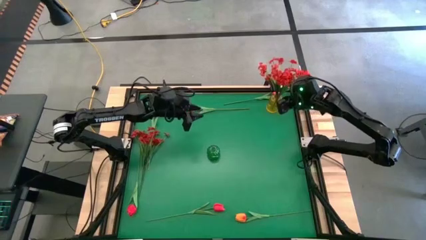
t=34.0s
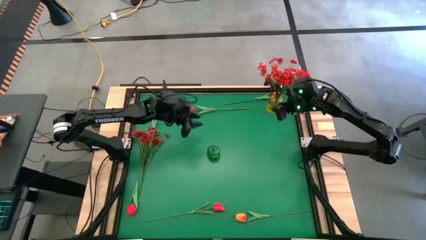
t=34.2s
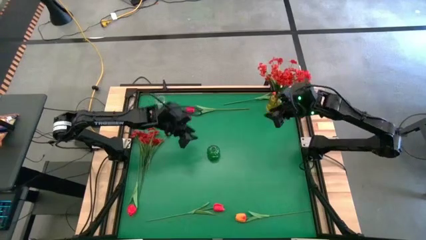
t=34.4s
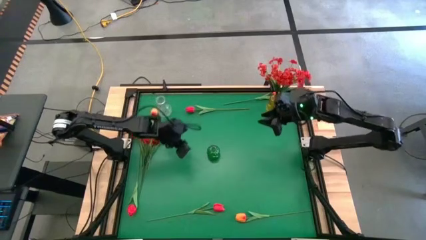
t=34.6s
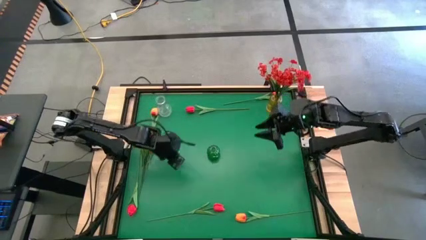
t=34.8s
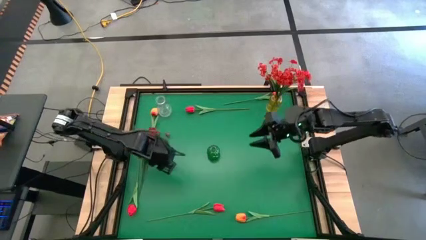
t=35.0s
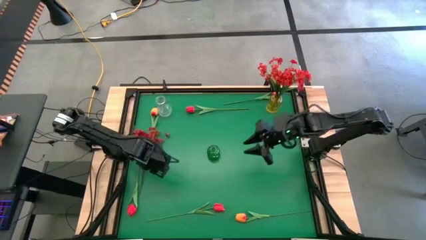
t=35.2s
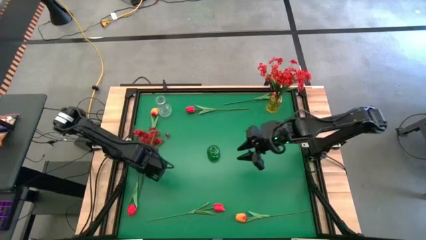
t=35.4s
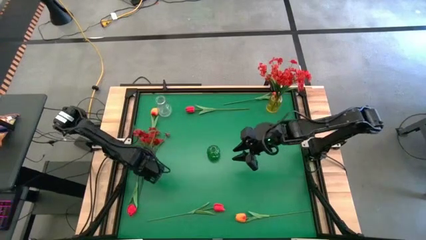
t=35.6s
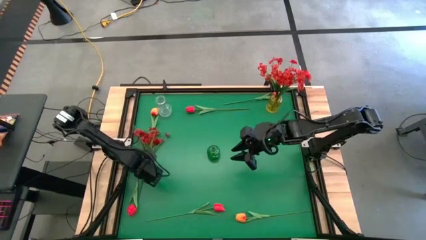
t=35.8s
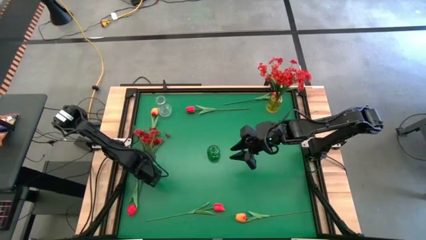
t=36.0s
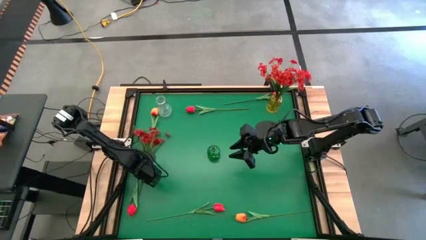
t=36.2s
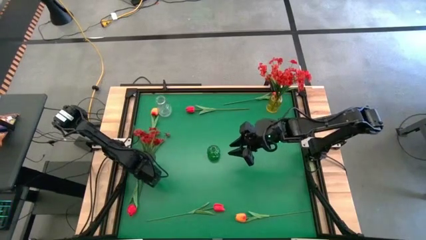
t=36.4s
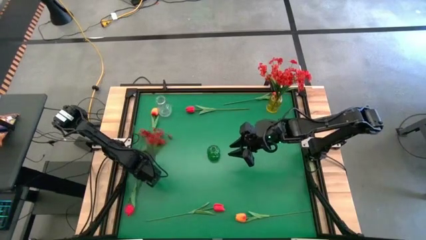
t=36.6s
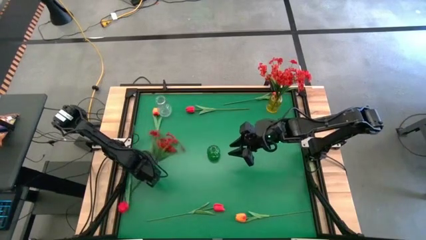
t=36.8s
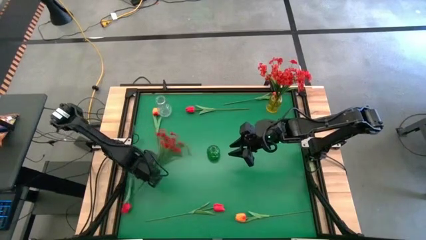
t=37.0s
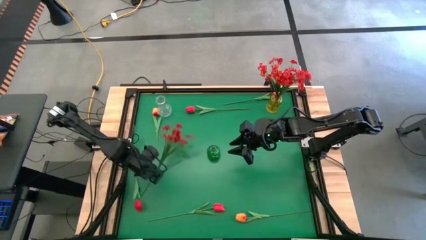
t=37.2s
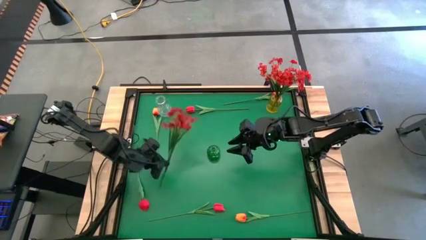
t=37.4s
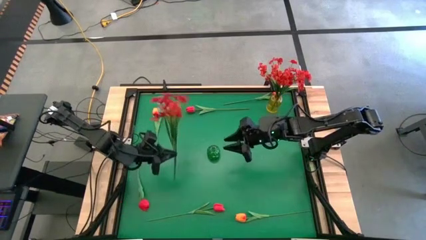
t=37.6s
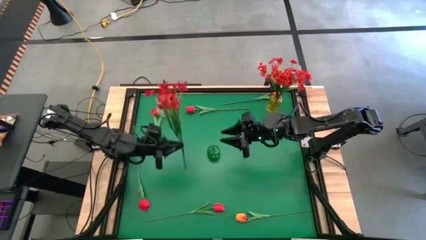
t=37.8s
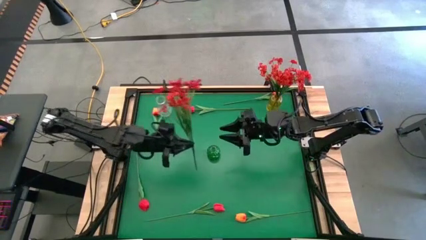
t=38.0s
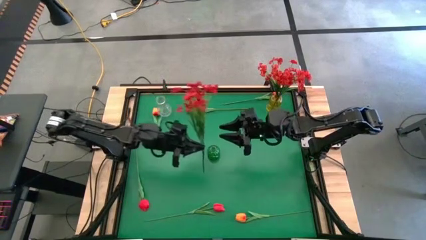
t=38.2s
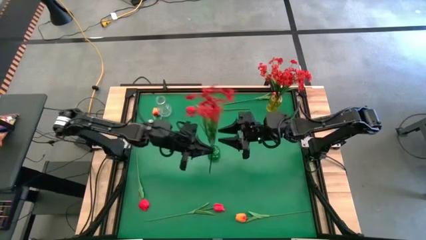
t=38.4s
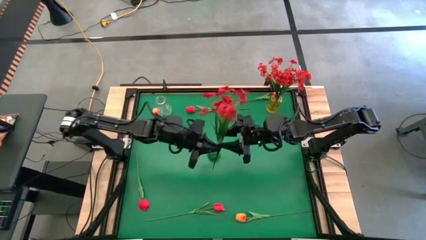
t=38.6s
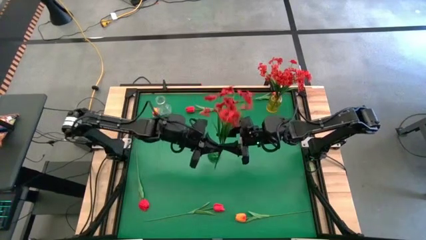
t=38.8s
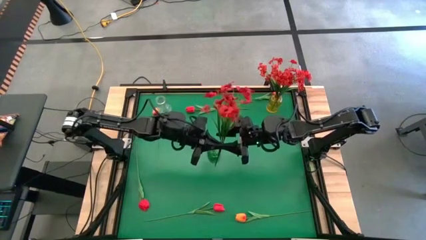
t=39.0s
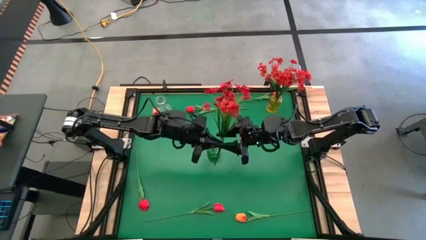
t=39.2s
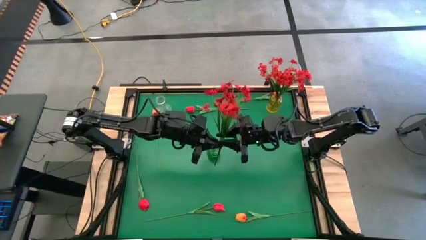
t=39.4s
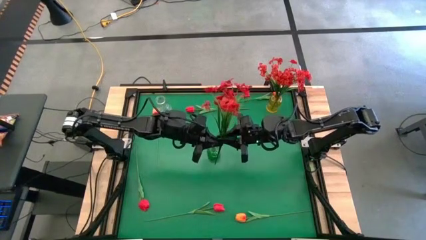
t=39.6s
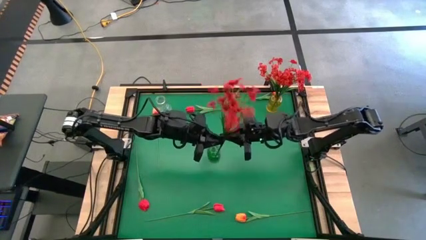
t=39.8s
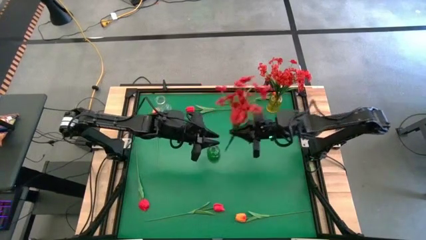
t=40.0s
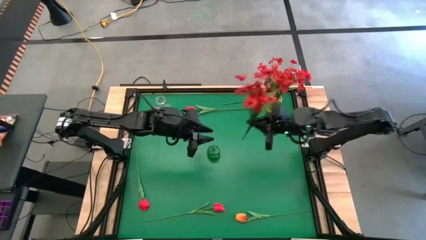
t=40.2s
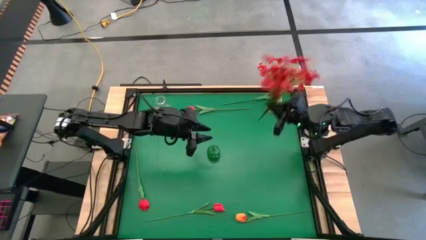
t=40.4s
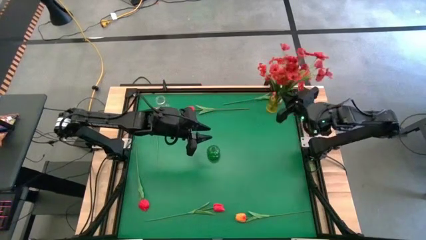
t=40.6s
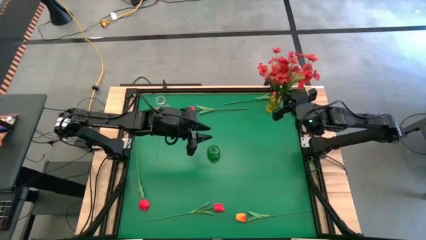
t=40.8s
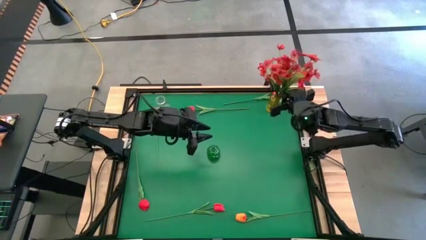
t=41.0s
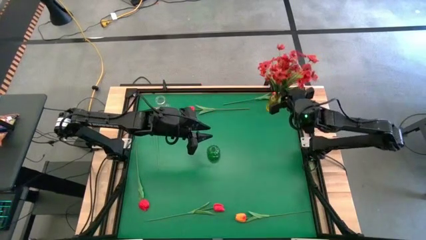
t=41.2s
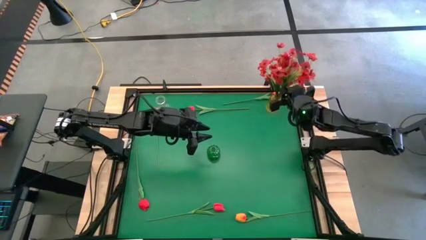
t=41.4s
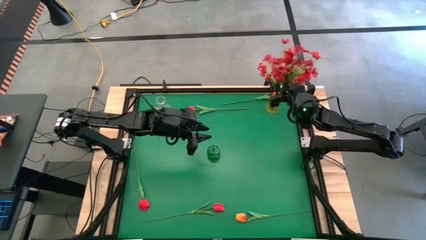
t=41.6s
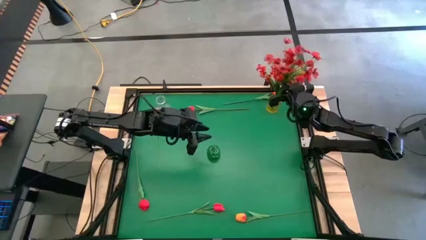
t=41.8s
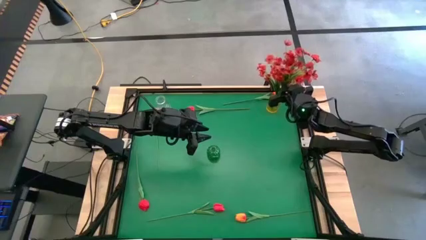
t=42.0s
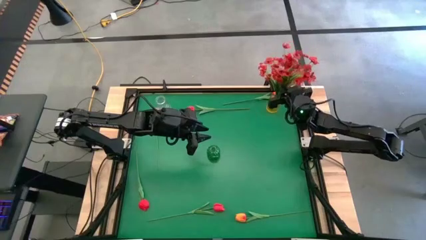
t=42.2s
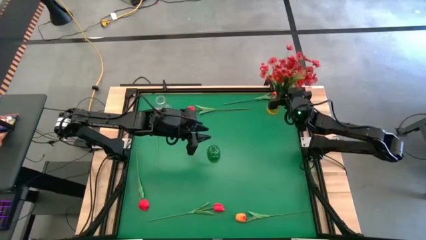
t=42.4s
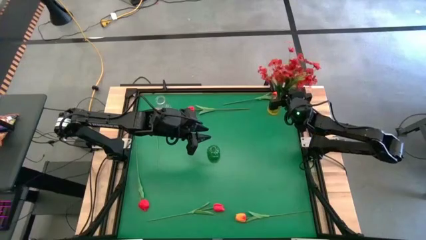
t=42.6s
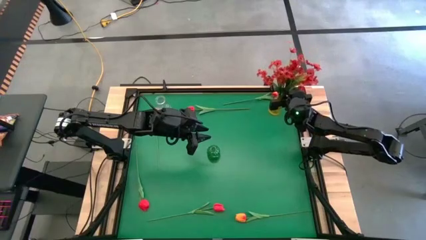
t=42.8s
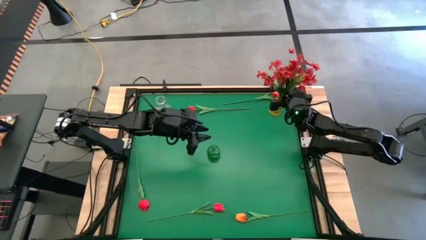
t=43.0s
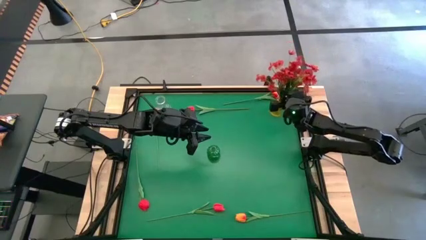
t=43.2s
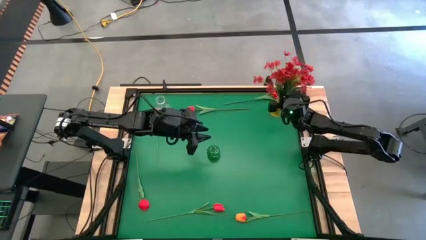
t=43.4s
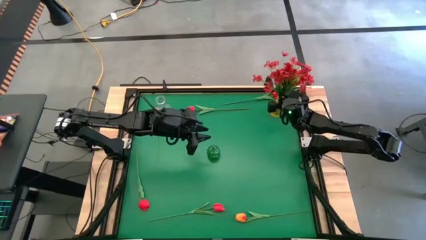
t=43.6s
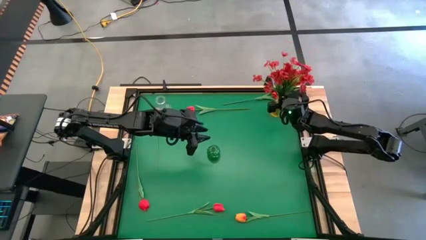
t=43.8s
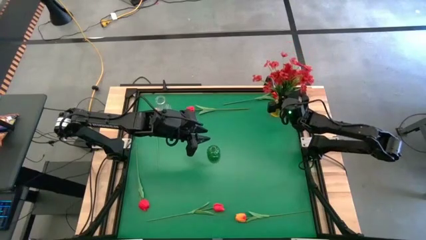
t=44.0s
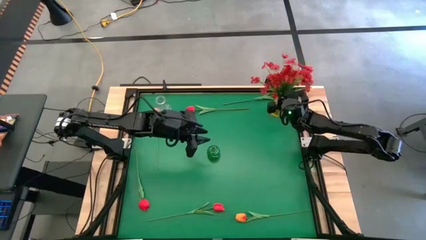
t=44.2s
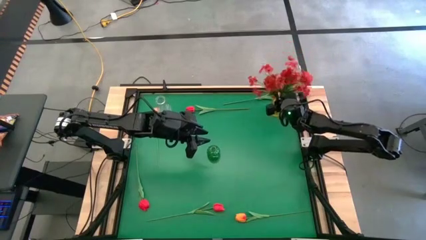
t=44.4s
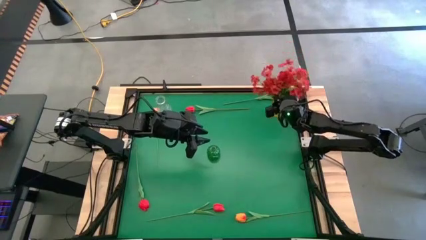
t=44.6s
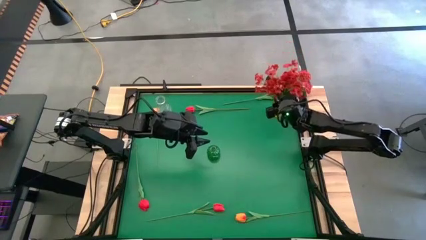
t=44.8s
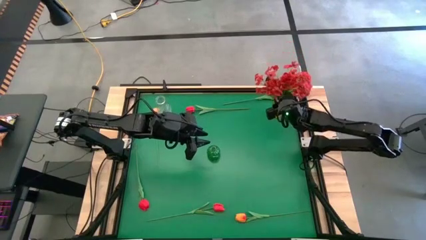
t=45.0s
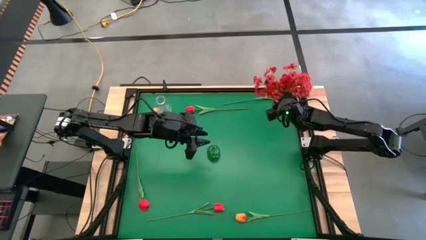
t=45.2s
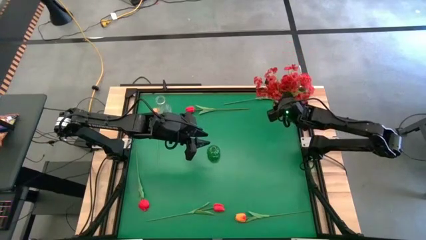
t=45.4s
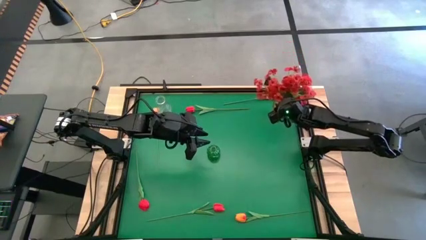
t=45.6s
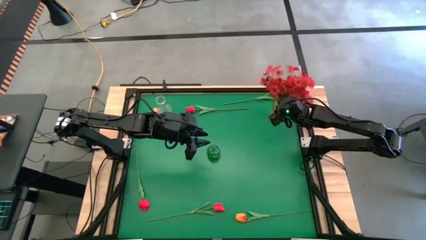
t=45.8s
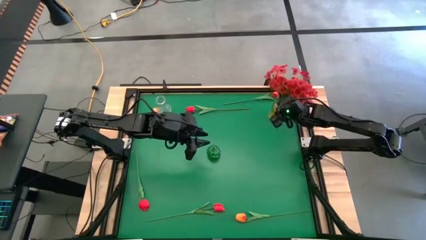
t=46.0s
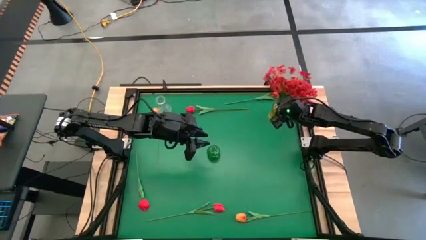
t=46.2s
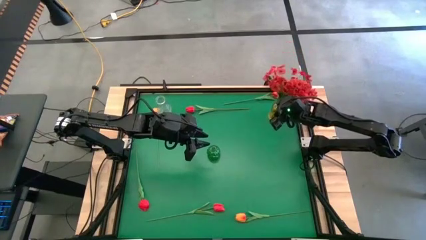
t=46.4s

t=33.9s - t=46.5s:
Task: Sort flowers into vase by color
Put the red flowers into the yellow vase

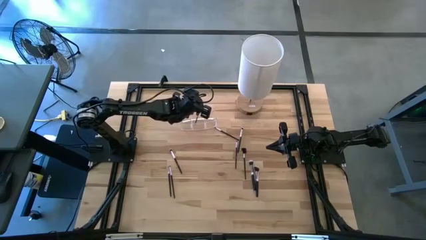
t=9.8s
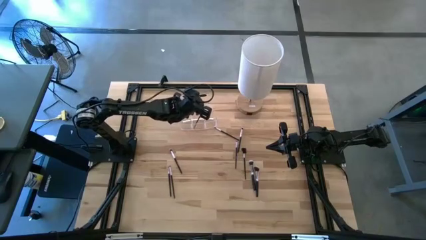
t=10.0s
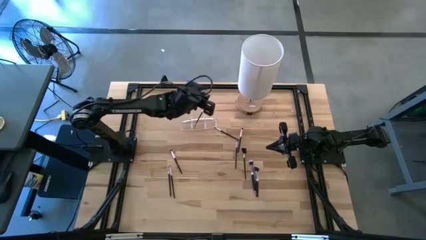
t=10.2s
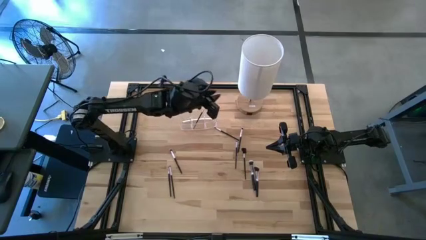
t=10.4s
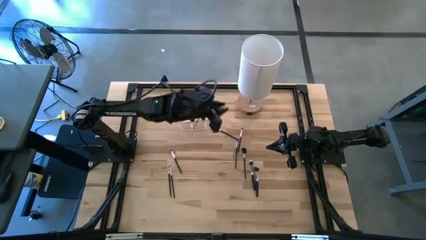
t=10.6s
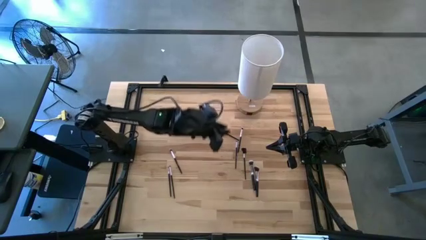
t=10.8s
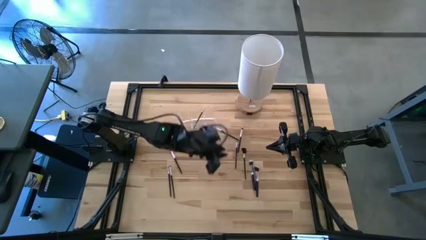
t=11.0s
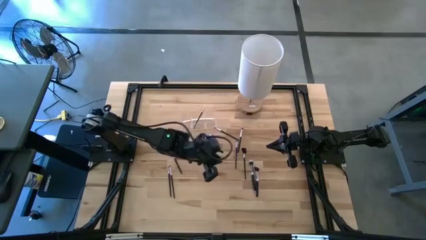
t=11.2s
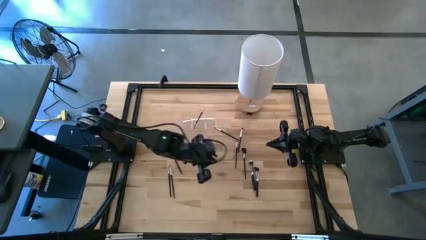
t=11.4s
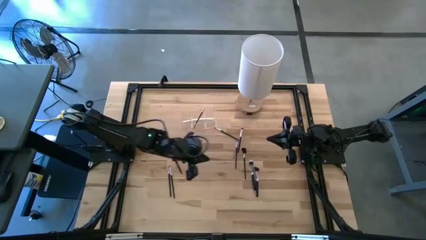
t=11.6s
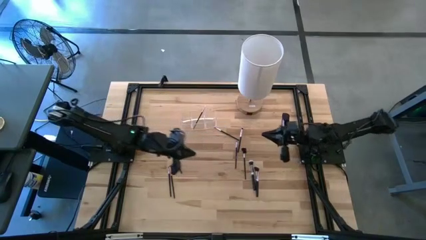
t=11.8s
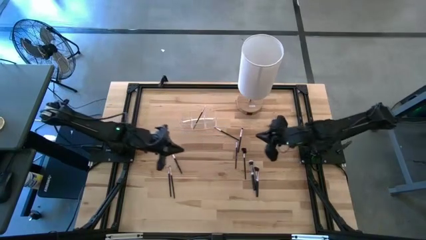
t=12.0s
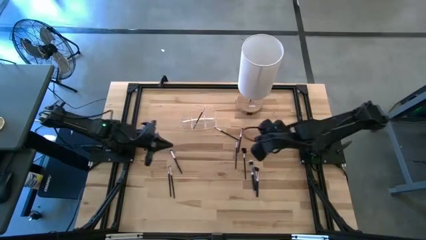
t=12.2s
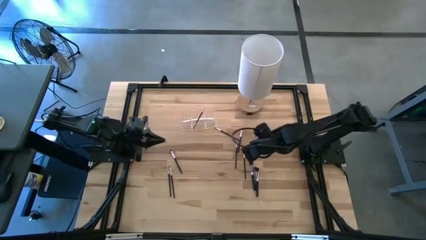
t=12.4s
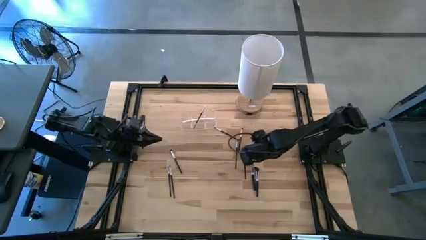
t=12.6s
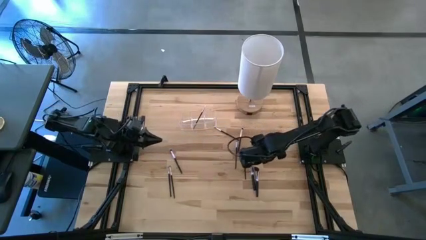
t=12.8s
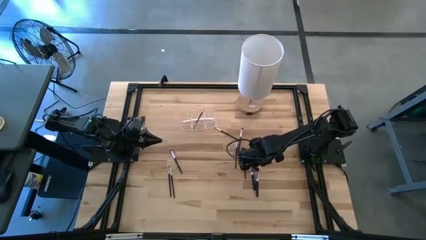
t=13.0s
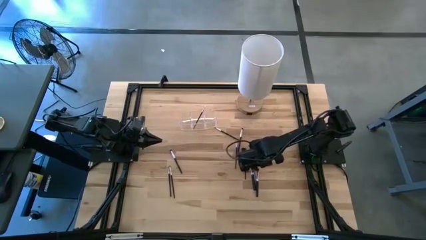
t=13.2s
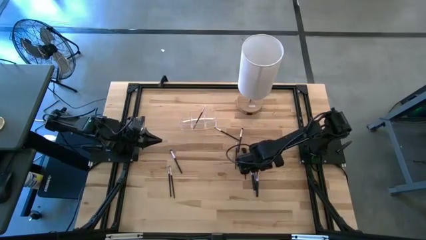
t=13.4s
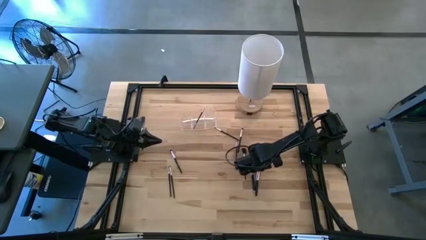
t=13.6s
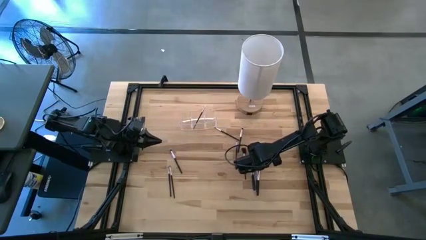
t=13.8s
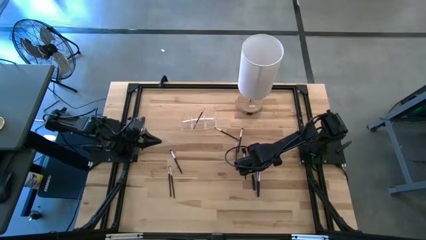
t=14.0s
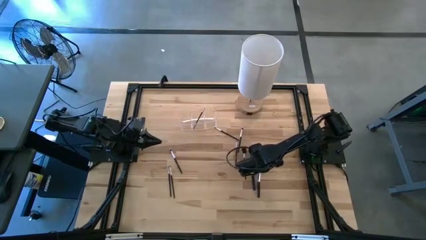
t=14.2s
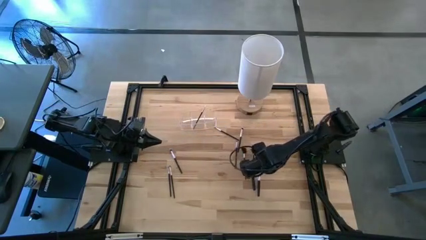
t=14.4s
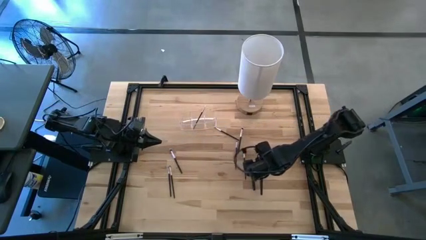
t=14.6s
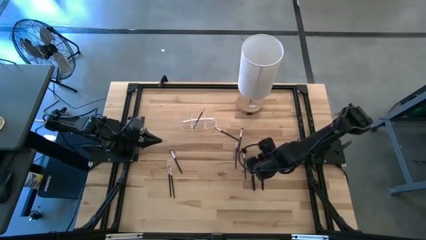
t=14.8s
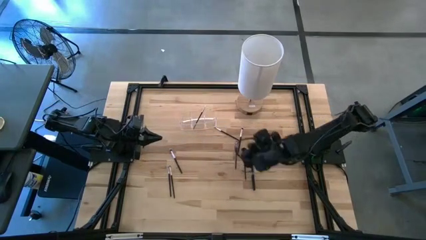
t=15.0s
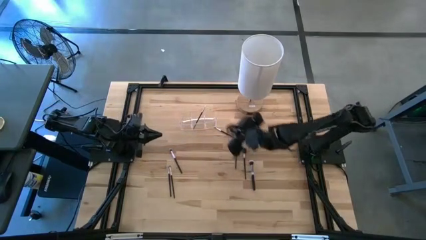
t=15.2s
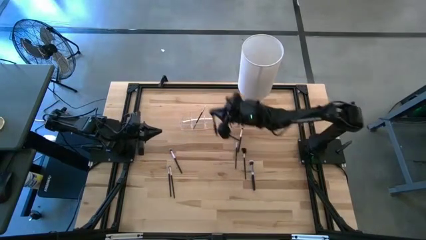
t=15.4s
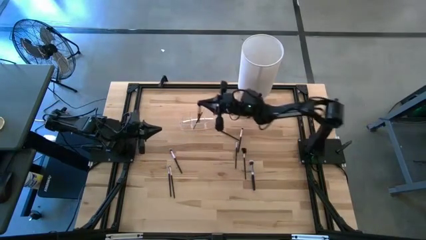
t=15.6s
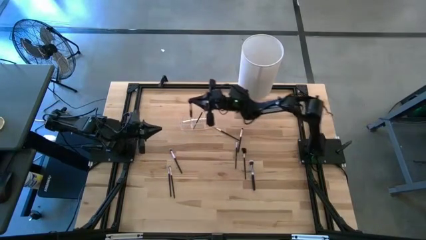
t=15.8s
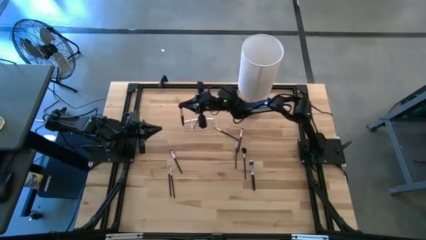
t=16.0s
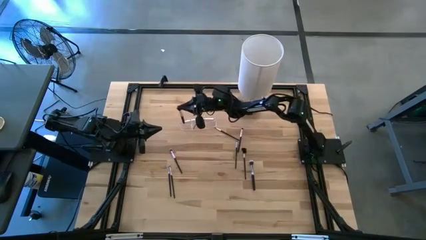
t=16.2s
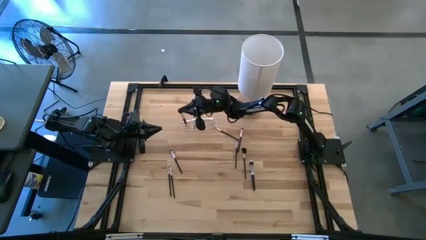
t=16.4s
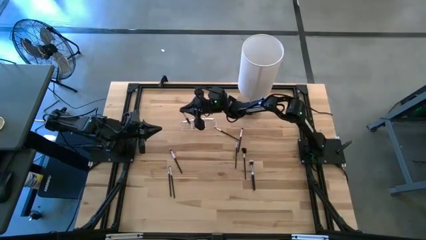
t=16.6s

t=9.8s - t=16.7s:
Task: Put items in baskets/containers
Put the black powder brush into the transparent organizer
